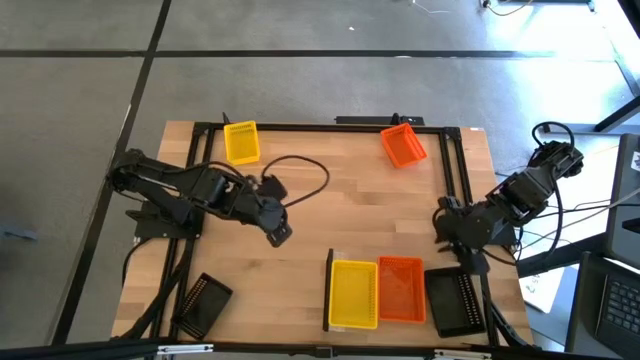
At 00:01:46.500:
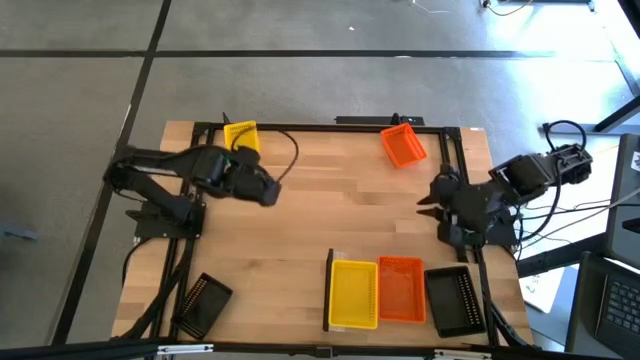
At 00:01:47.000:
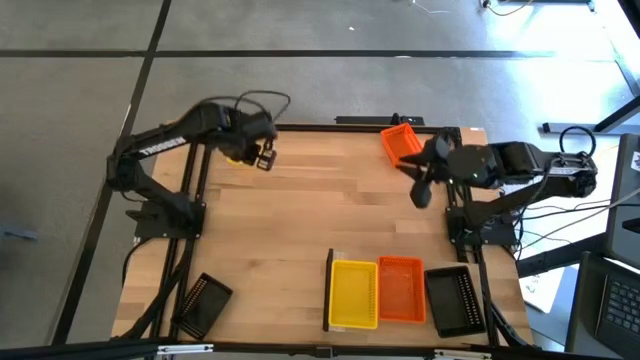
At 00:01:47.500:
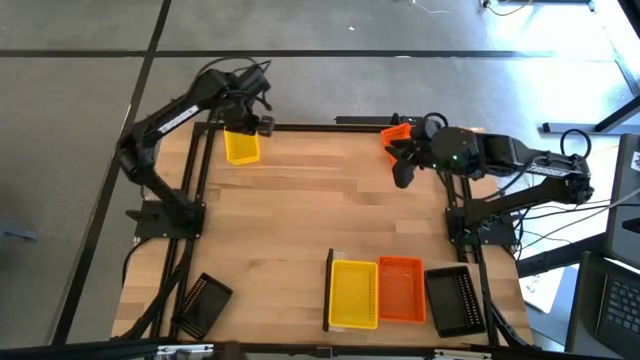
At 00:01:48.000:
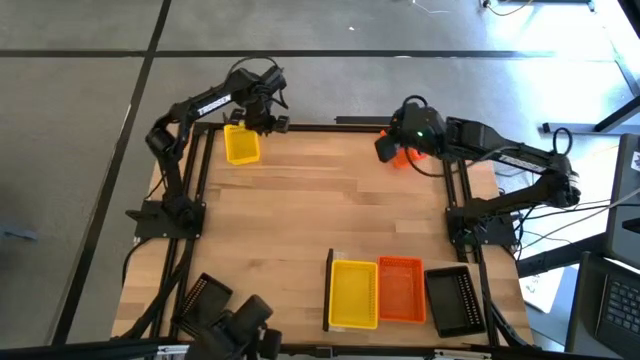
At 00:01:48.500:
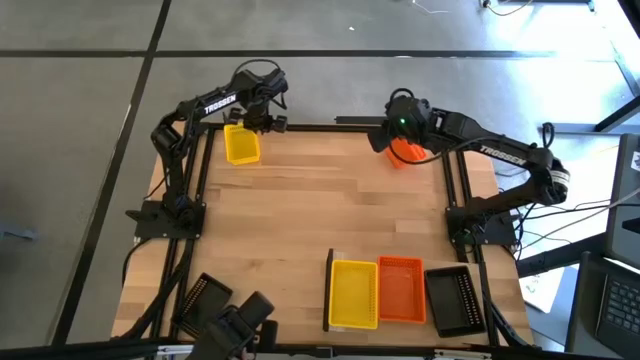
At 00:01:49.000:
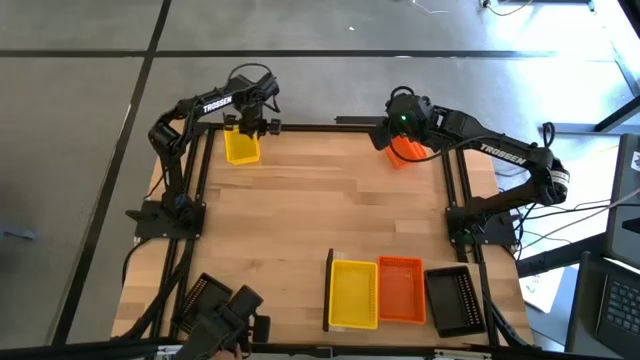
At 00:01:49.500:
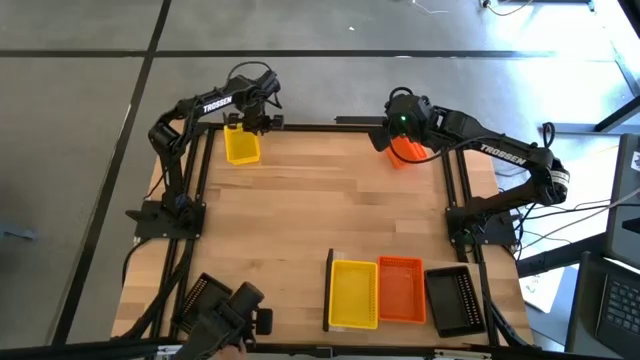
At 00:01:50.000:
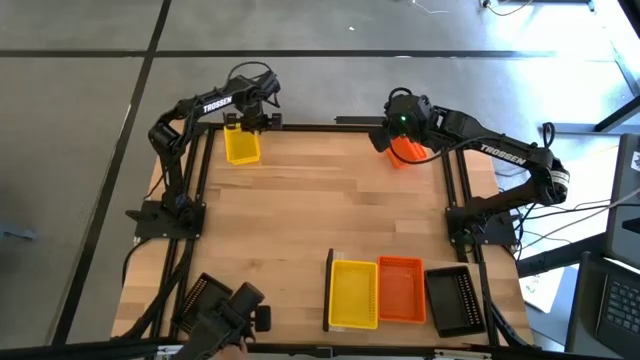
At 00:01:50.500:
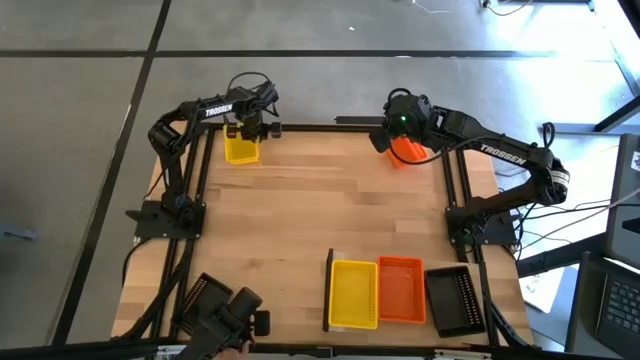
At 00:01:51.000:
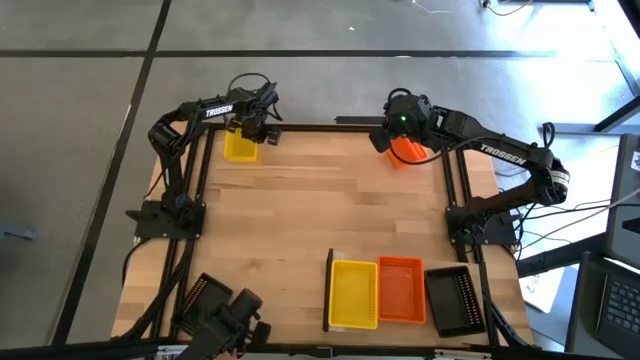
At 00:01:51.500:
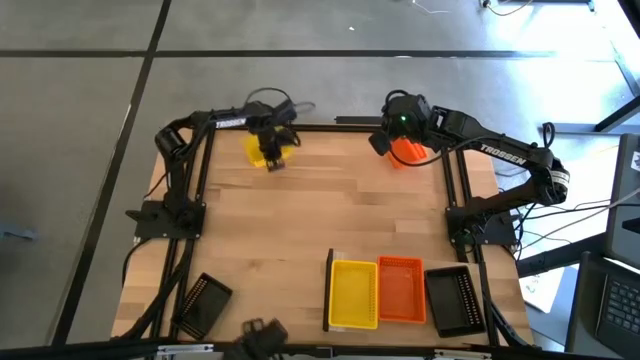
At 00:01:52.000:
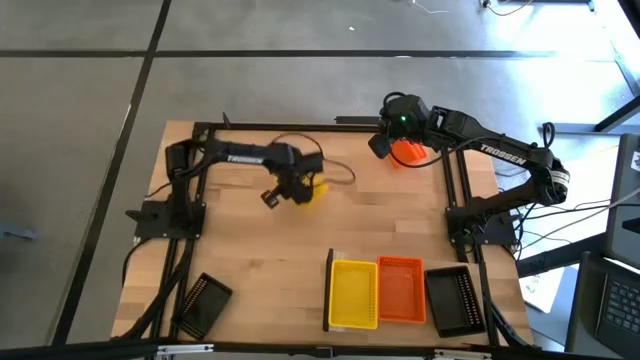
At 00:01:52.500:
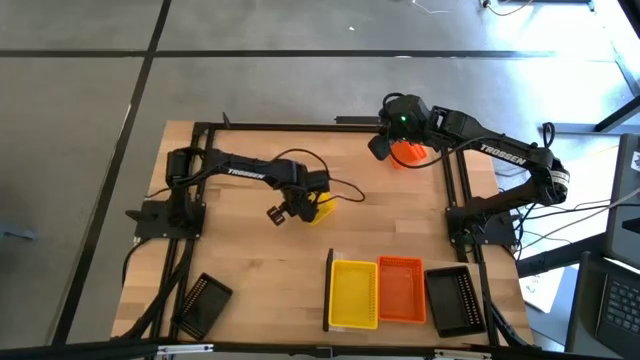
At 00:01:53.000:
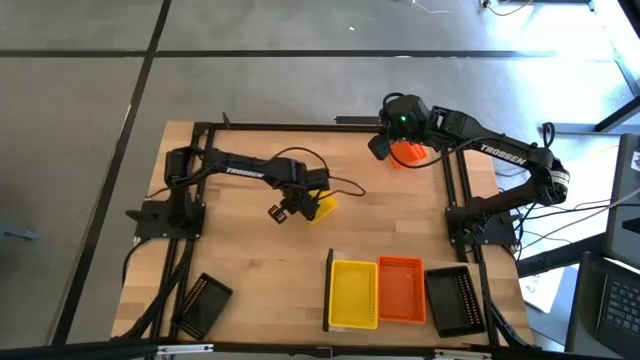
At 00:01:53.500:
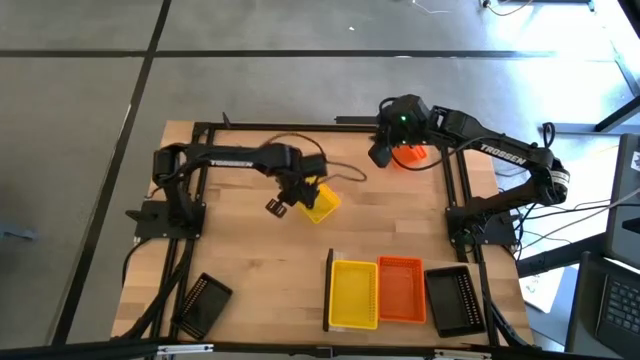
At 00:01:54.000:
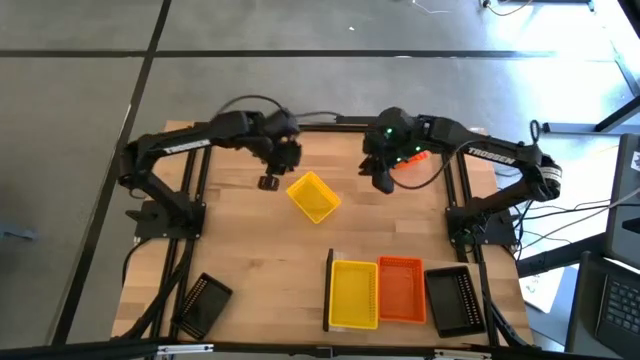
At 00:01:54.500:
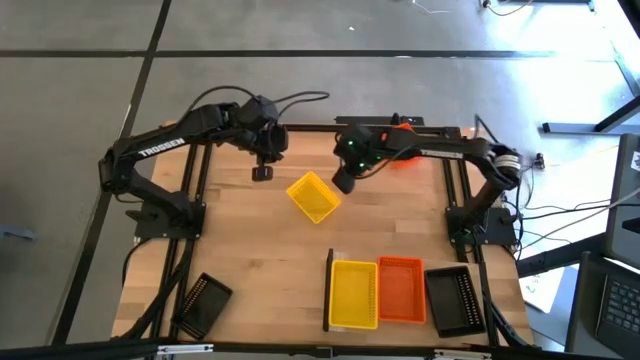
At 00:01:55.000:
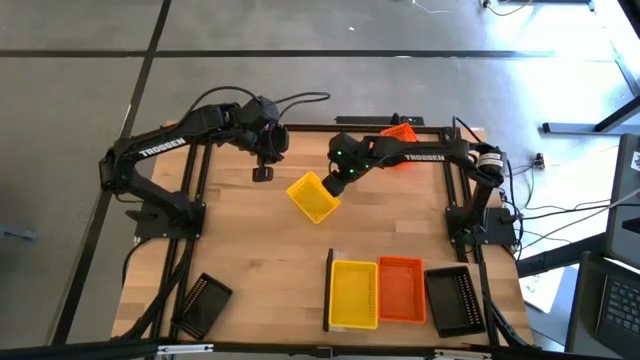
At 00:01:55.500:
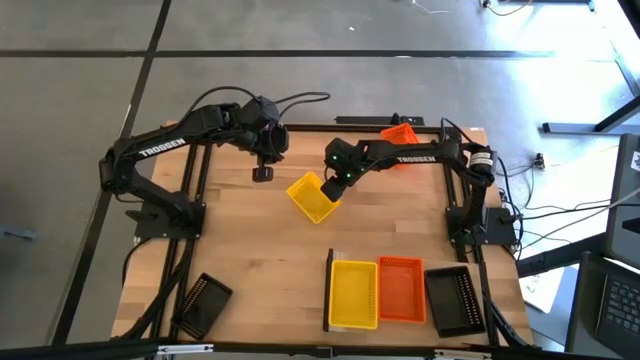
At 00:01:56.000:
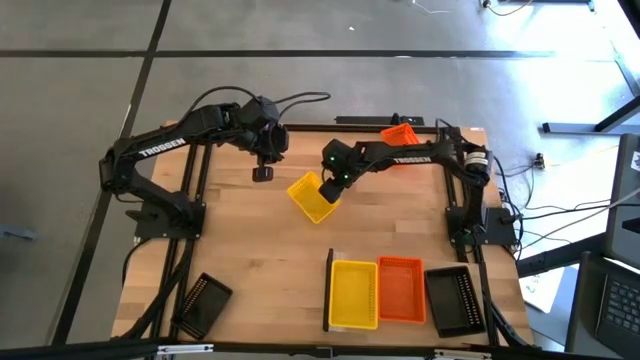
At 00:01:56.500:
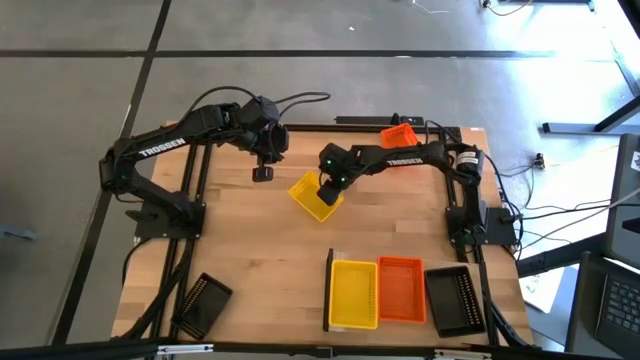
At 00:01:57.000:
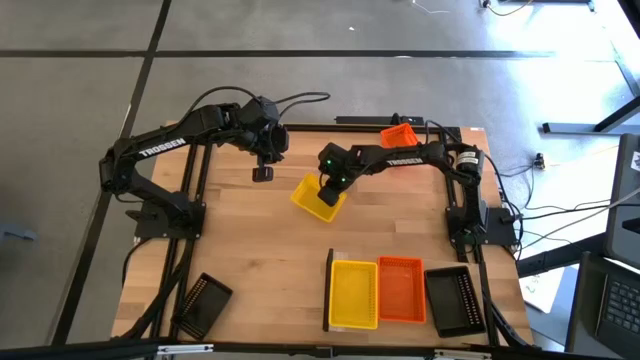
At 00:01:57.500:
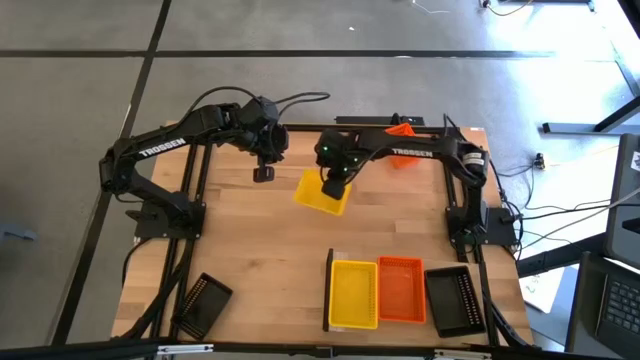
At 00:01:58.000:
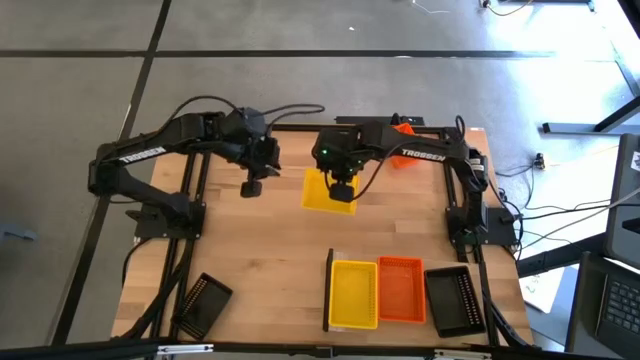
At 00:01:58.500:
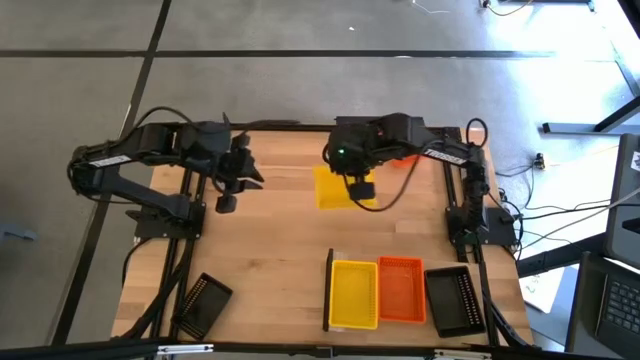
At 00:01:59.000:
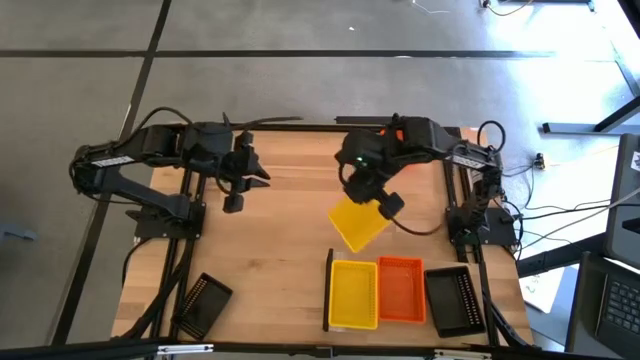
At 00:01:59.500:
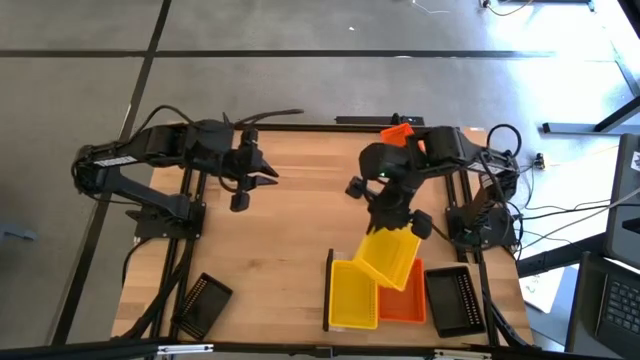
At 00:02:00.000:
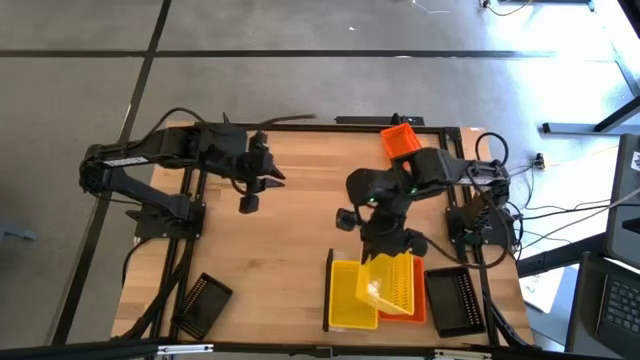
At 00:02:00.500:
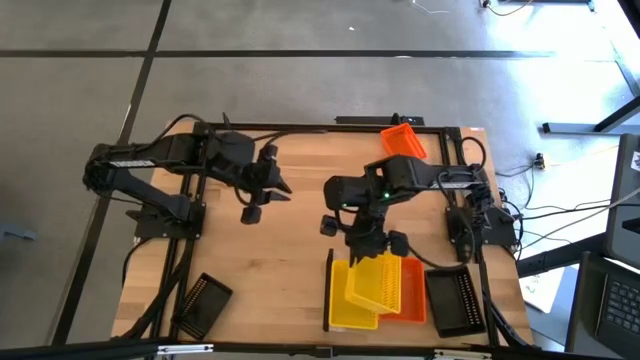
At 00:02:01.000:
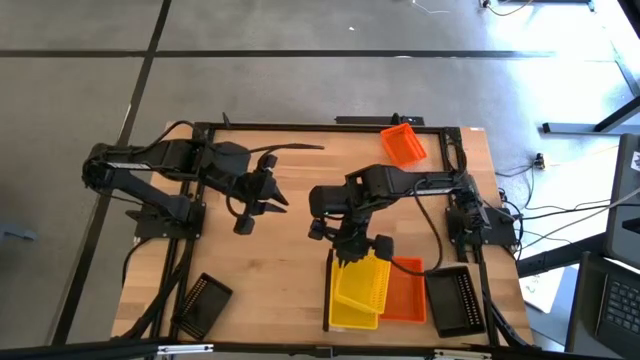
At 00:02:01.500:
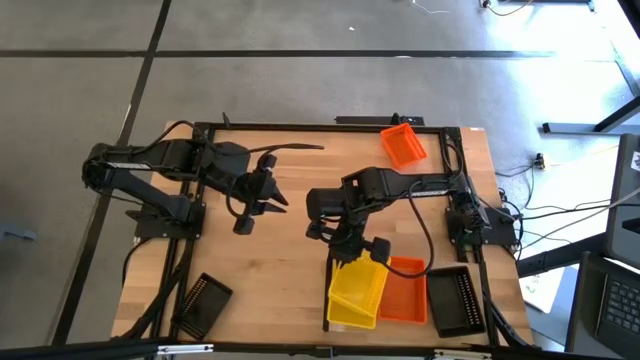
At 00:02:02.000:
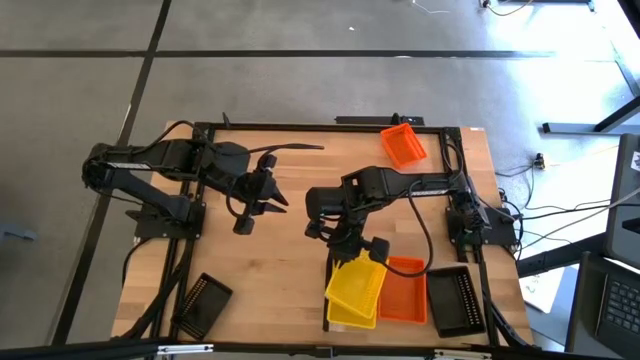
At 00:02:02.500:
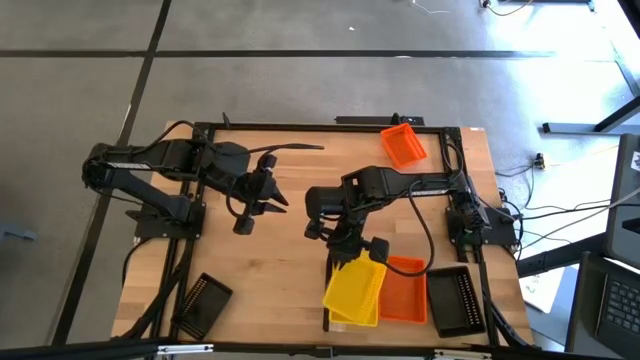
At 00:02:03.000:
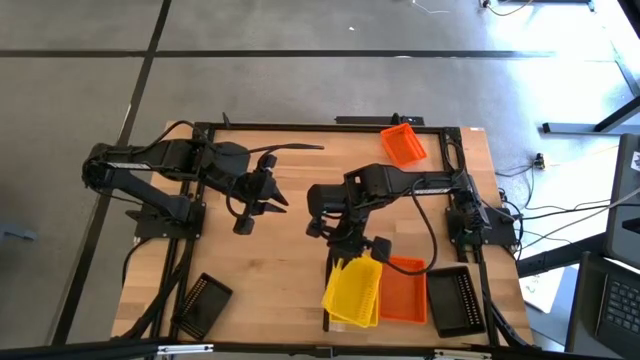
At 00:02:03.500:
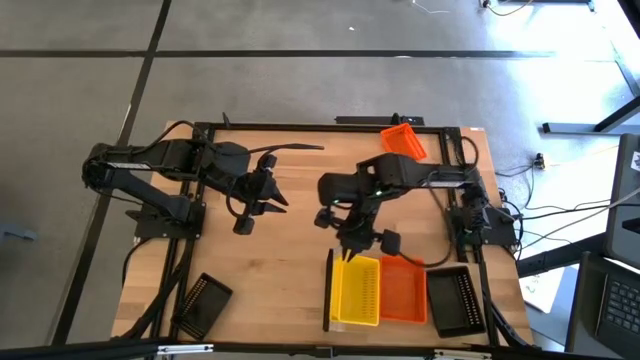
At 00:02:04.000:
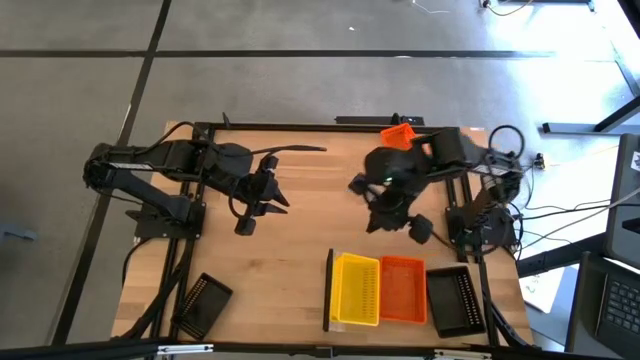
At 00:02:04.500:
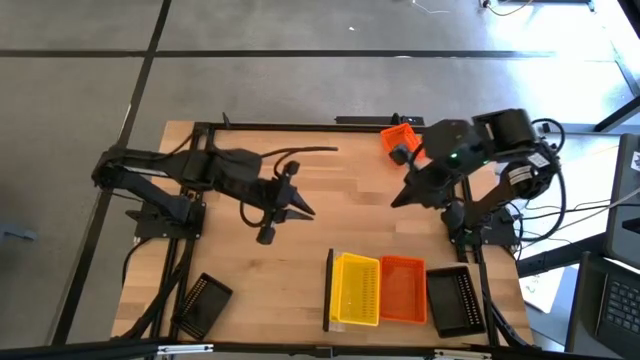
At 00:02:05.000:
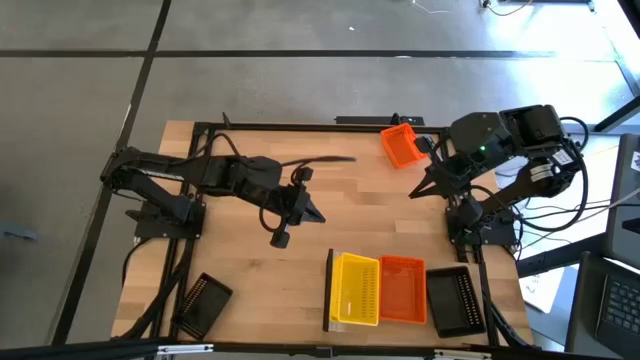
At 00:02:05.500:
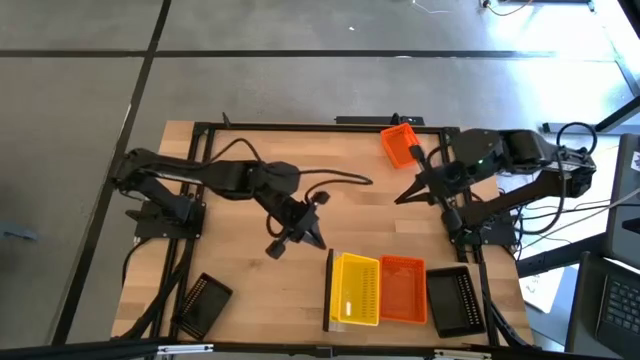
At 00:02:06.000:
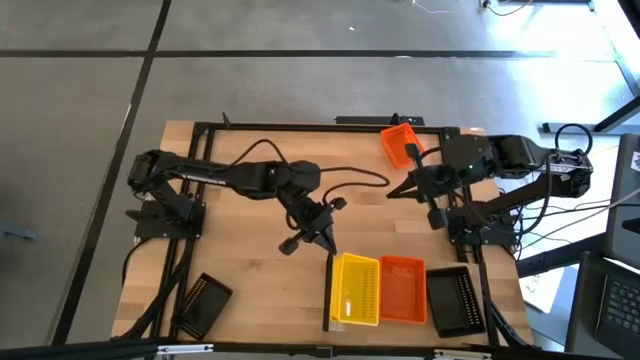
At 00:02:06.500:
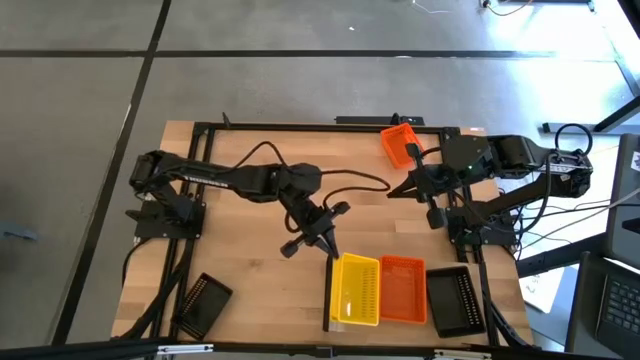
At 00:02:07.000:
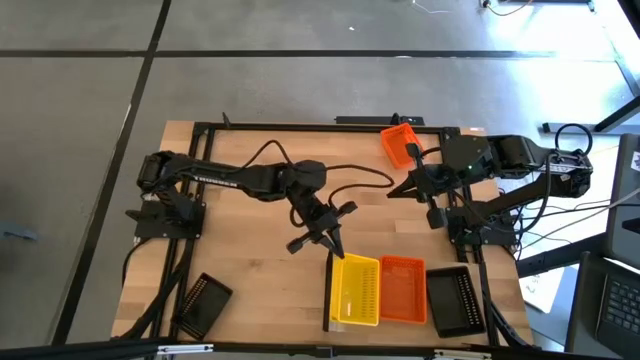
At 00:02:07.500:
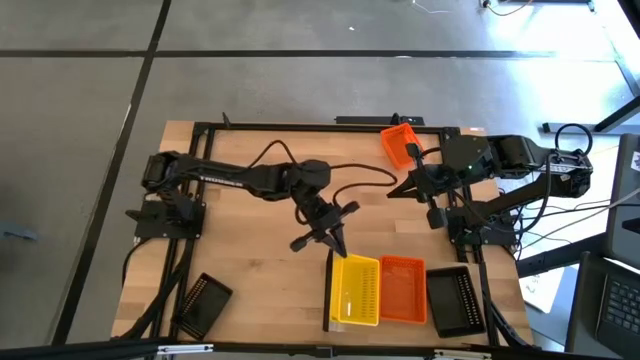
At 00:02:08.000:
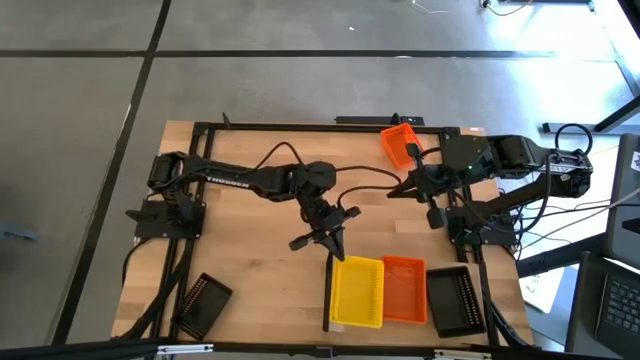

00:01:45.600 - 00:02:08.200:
Task: Stack baskets on shelf by color
Stack the yellow bin on top of the yellow bin
